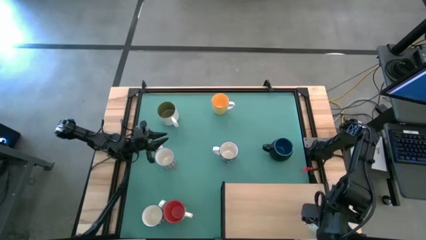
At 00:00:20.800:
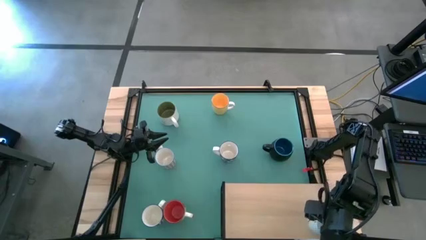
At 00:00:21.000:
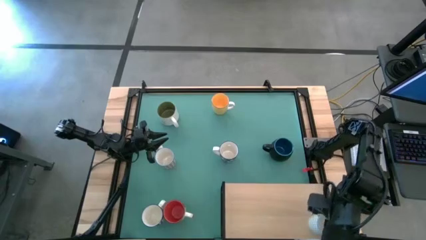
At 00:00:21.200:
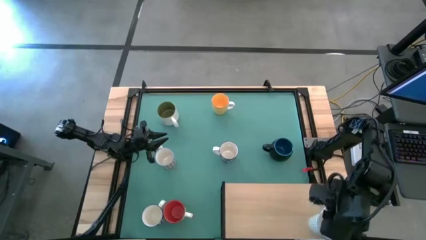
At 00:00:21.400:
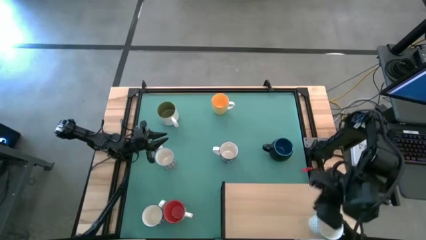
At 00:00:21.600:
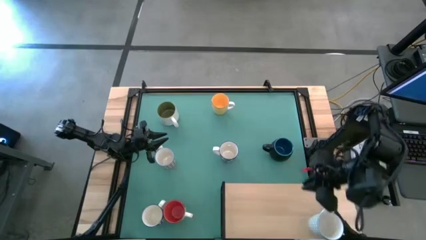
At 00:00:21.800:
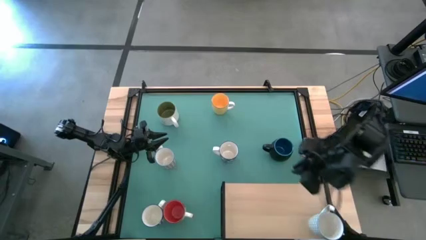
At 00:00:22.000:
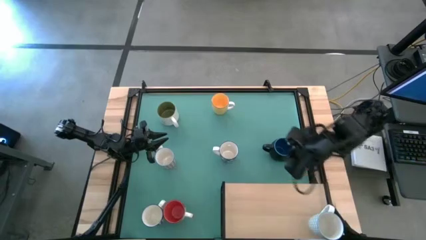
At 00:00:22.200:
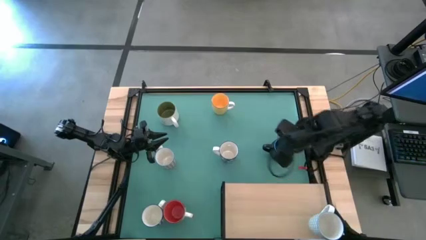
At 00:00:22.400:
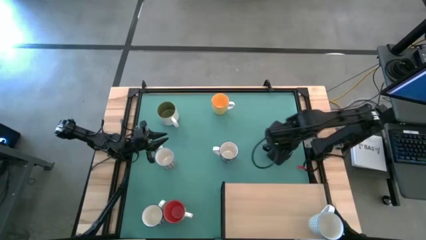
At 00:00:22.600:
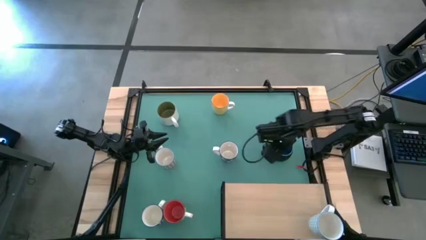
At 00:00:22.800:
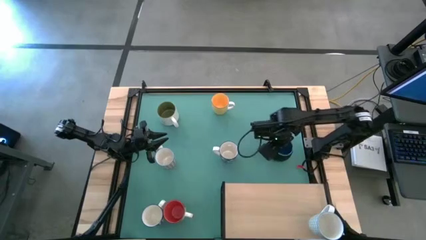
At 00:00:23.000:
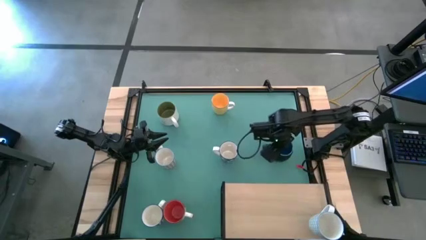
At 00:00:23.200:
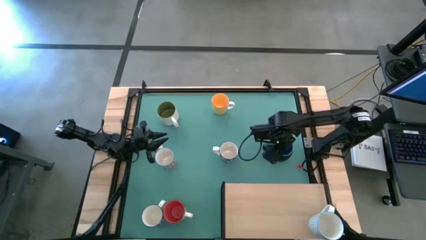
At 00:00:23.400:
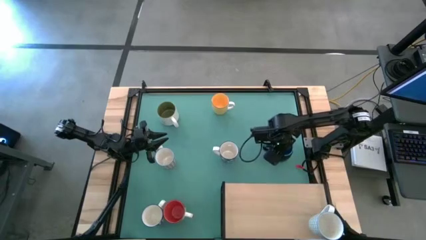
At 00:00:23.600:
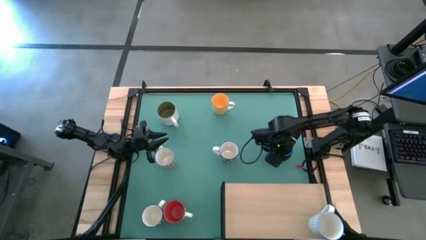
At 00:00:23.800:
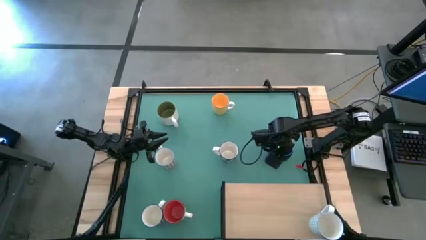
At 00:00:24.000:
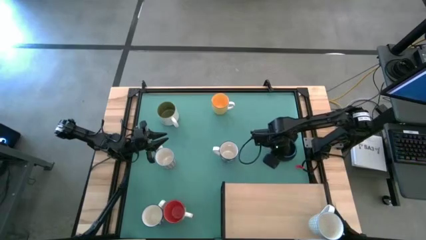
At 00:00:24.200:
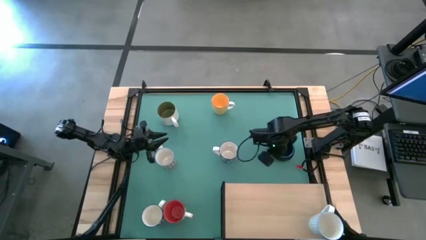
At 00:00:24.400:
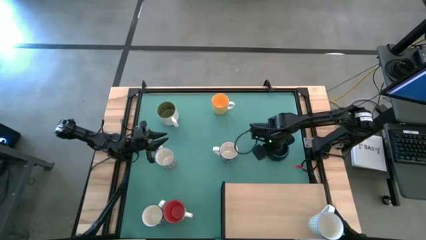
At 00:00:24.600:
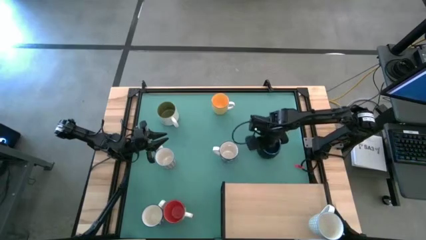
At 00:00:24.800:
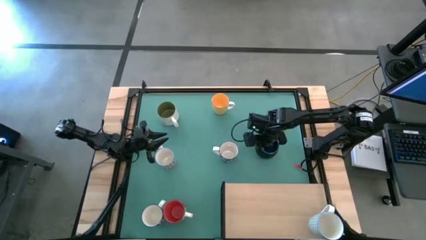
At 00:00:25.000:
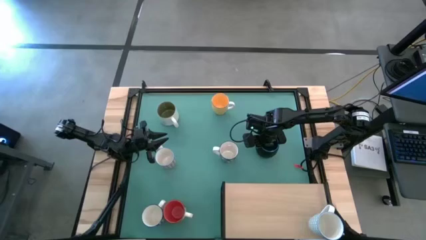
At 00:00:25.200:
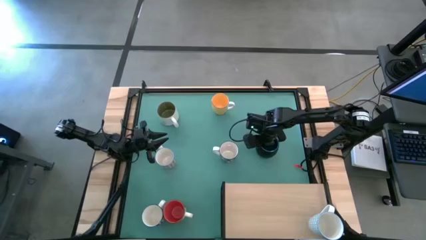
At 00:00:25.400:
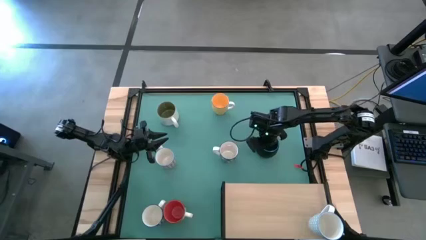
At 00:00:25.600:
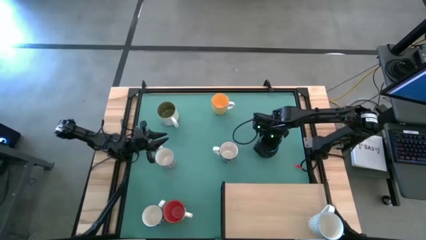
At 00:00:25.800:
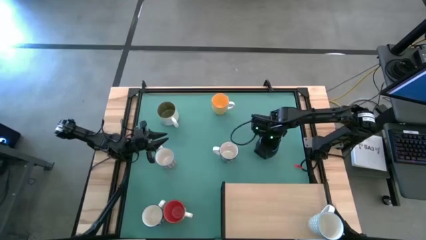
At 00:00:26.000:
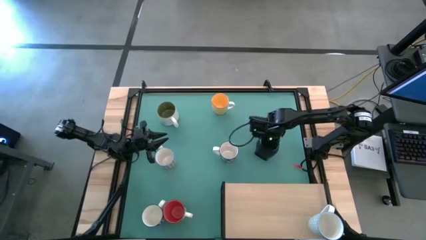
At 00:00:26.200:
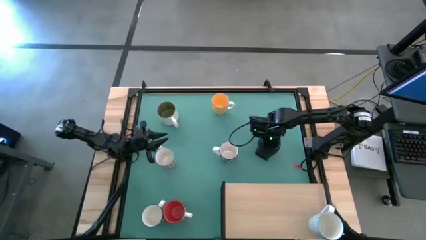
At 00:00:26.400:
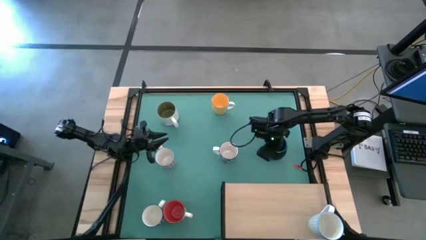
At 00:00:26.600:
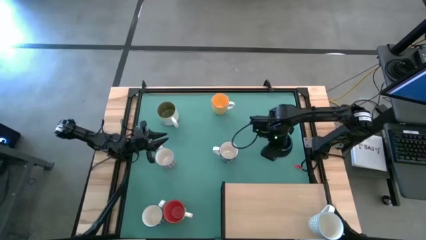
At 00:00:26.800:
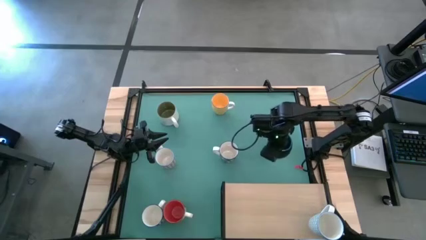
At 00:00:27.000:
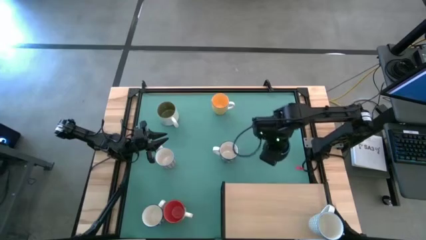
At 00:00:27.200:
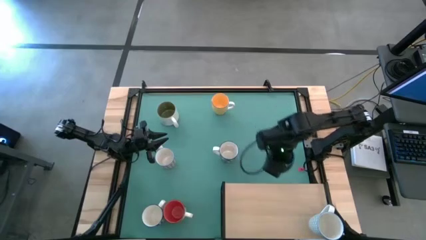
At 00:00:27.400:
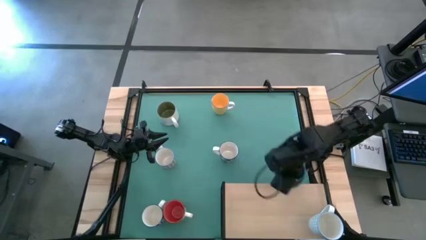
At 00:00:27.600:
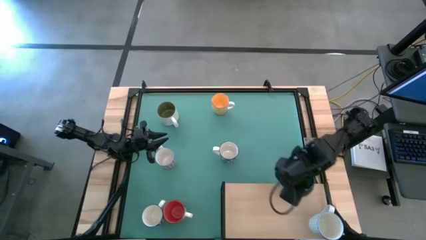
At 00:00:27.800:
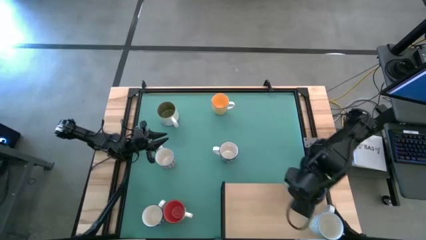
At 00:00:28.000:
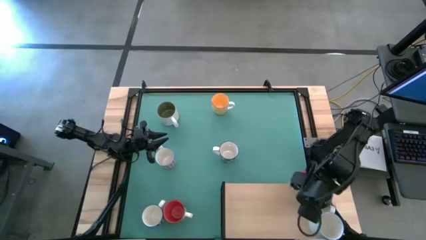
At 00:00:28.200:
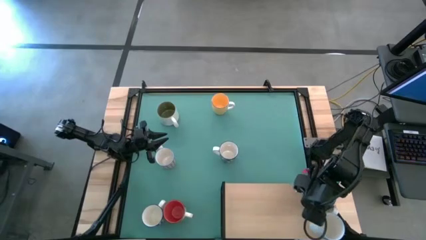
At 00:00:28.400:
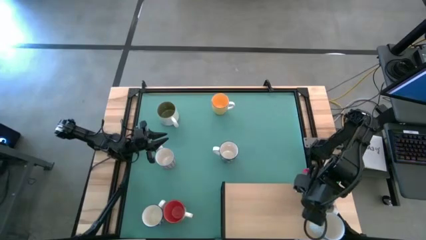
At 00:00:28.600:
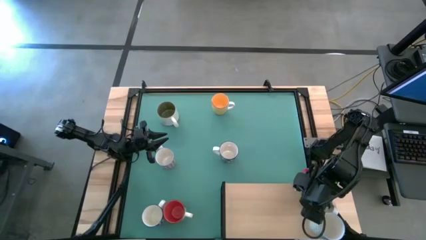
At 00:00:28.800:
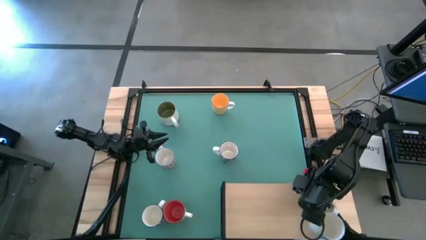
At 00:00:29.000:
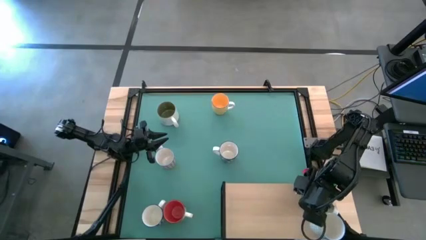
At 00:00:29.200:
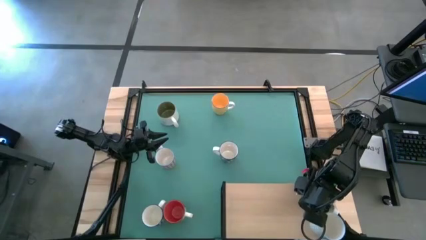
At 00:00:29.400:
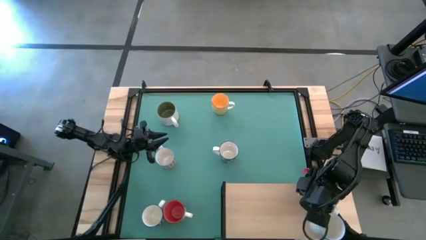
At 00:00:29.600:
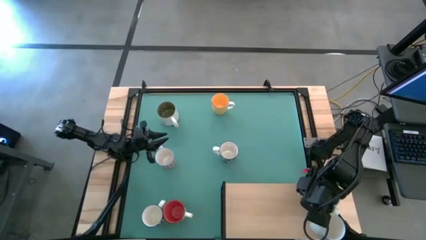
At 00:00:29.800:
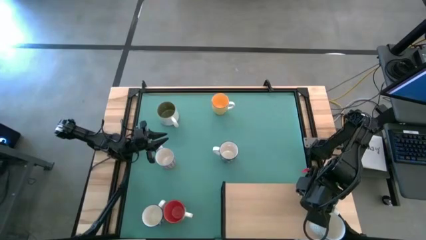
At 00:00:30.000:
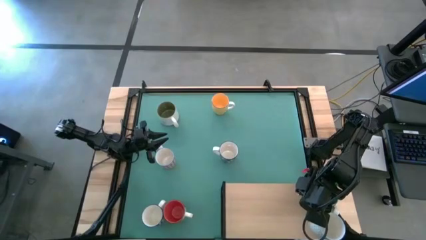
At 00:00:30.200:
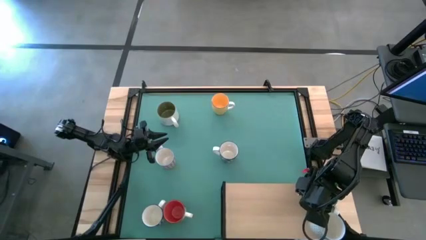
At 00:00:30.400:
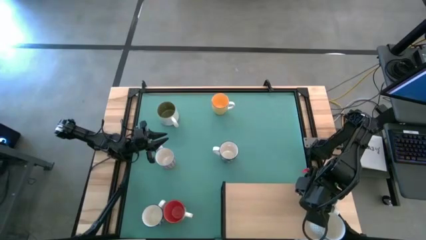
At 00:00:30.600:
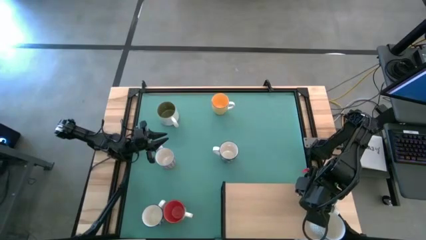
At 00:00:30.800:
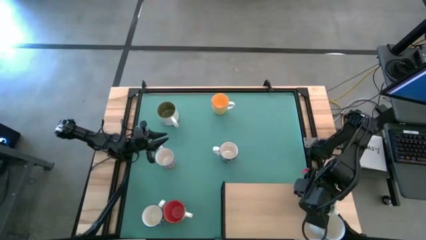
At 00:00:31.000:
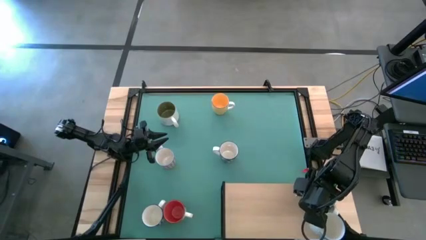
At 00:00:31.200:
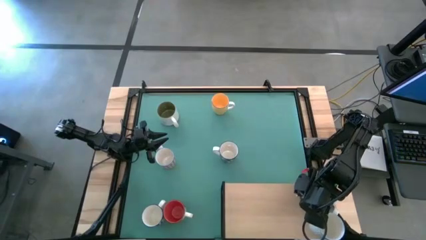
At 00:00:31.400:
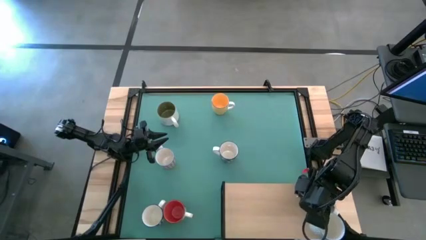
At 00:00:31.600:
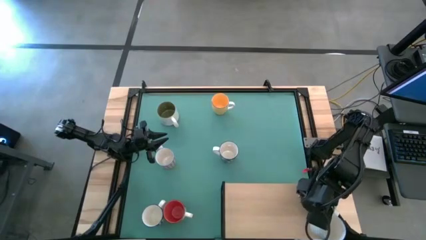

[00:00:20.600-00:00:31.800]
Task: Place coffee mugs
Put the black mug on the shelf

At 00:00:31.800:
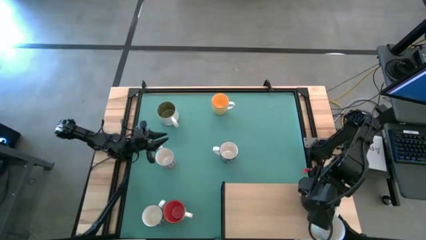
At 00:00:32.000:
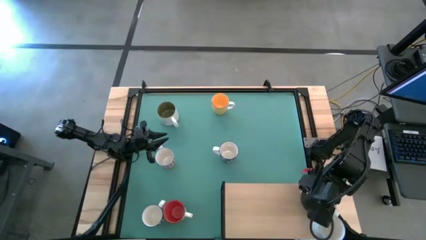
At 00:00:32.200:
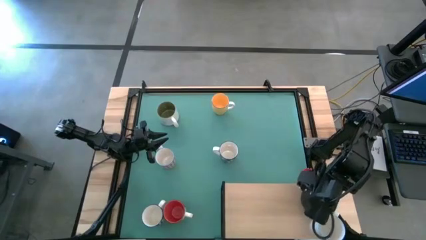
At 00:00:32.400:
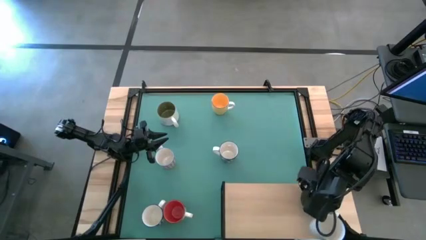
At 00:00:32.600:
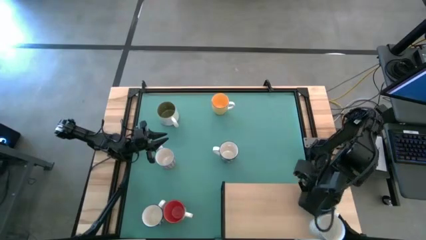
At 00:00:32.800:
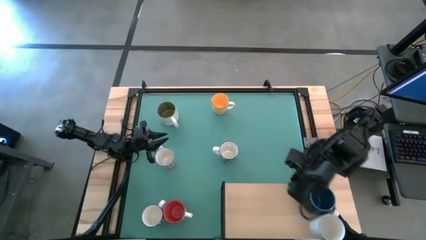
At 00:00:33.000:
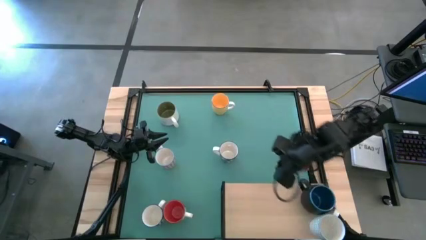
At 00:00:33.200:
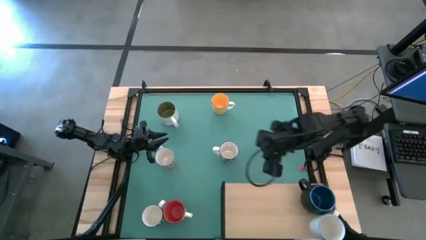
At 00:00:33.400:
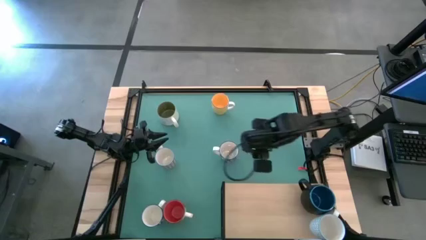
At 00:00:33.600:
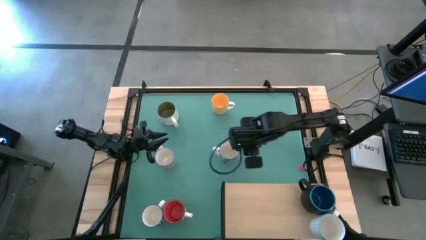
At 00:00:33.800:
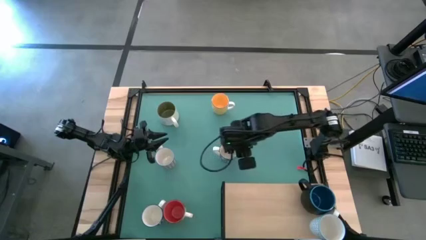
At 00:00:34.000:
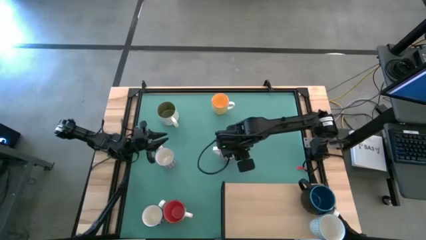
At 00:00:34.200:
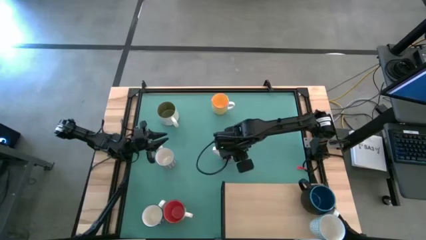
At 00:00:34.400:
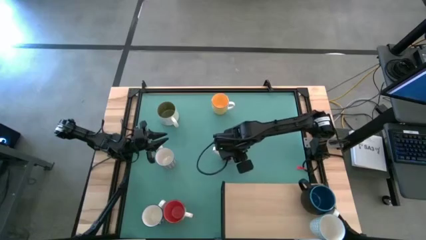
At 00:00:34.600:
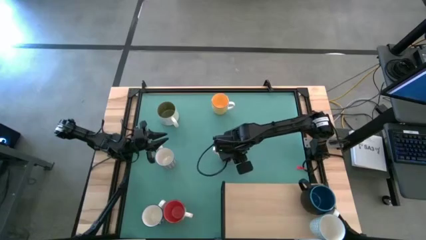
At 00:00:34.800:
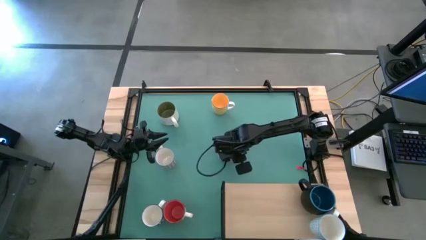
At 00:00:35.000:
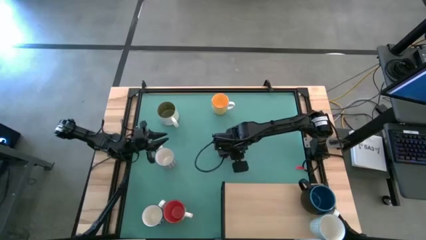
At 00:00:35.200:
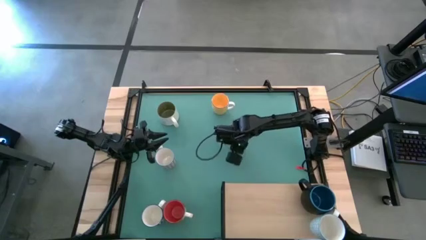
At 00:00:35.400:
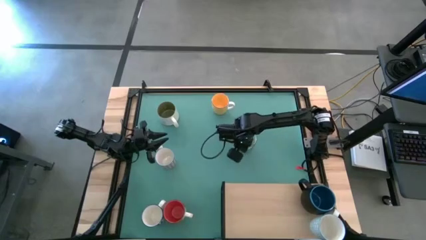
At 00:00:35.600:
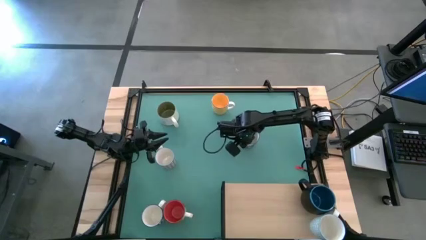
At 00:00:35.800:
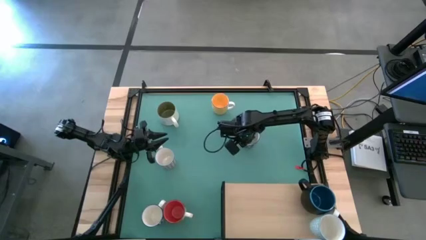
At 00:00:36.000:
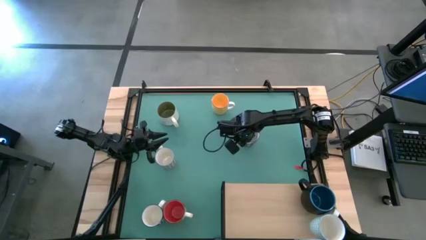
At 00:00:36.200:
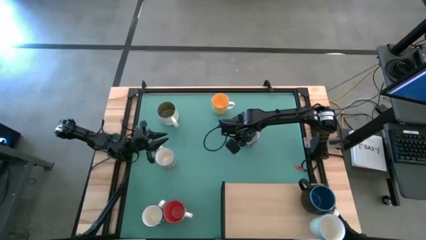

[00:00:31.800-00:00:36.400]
Put the blue patterned mug on the shelf
